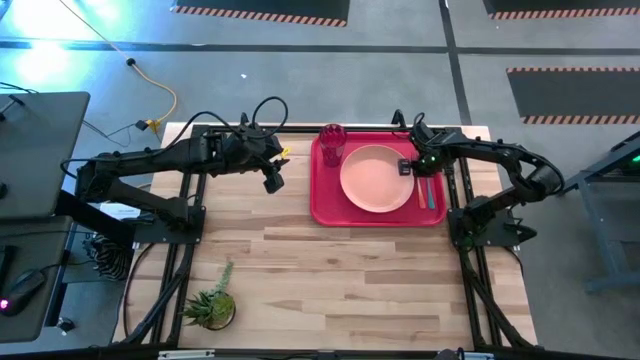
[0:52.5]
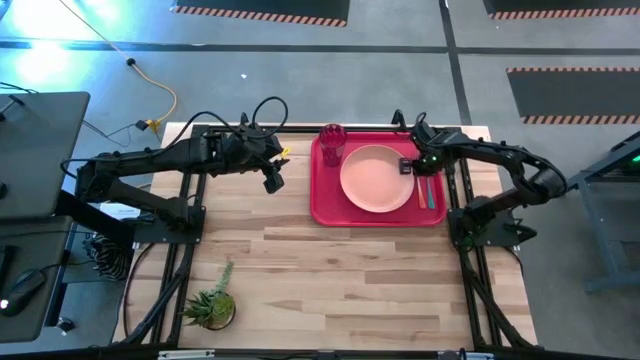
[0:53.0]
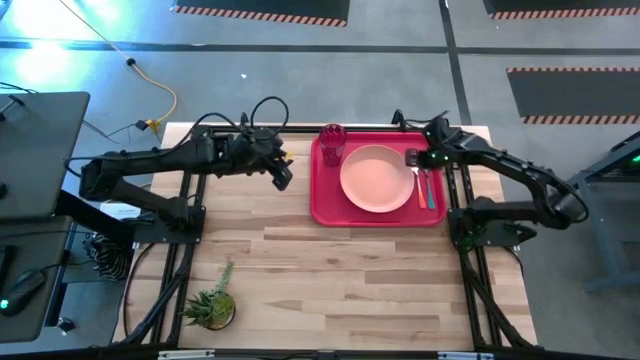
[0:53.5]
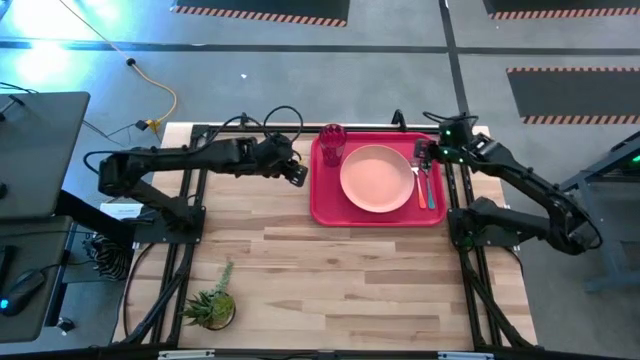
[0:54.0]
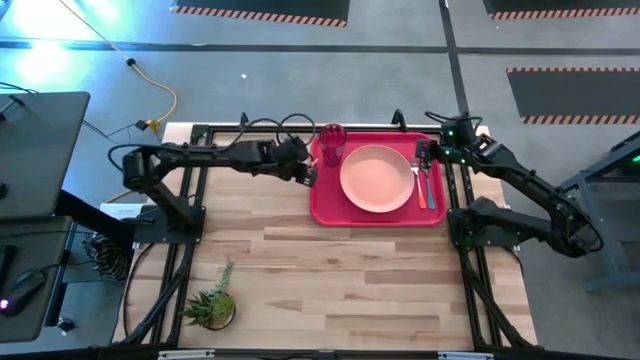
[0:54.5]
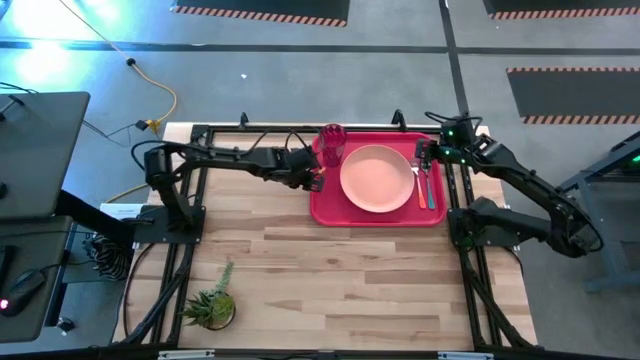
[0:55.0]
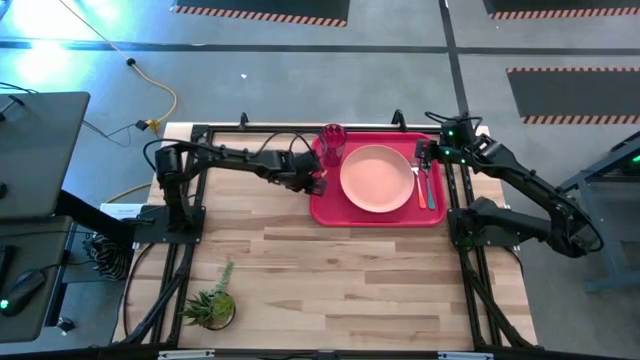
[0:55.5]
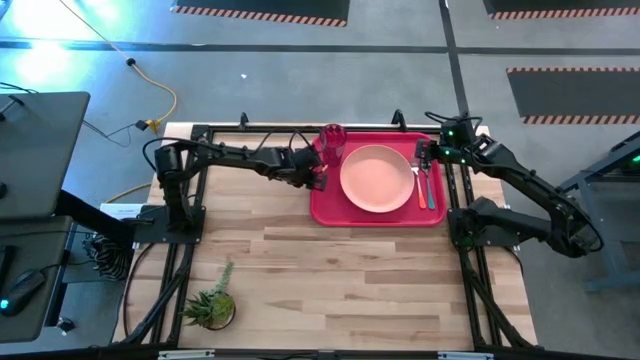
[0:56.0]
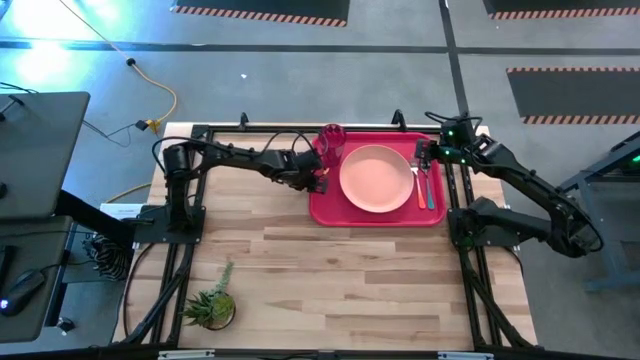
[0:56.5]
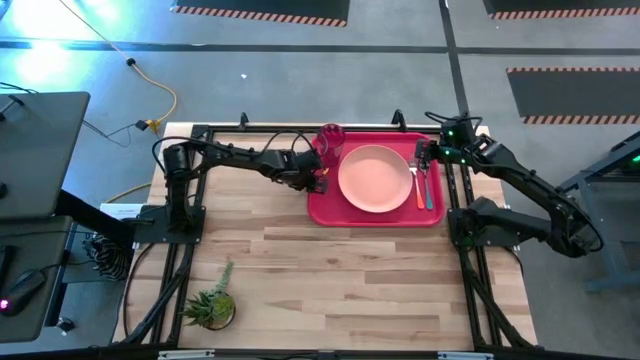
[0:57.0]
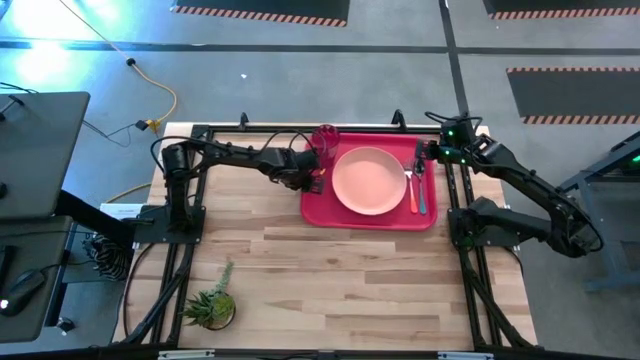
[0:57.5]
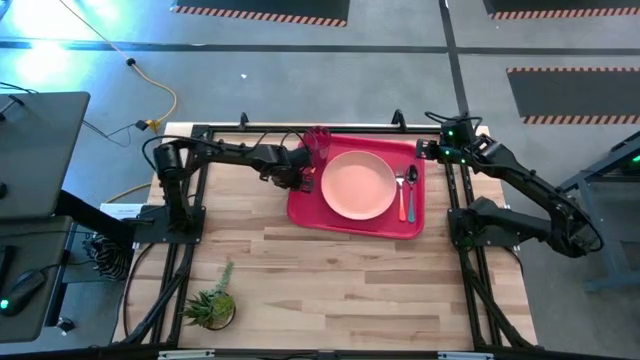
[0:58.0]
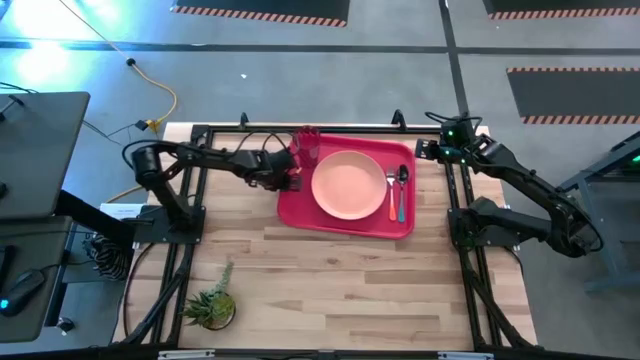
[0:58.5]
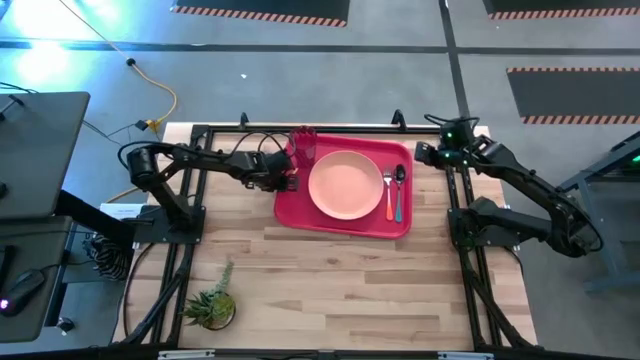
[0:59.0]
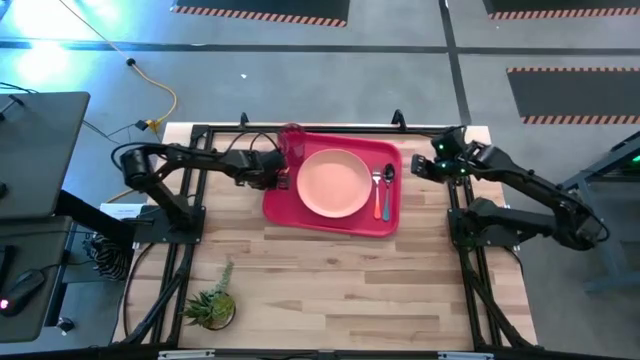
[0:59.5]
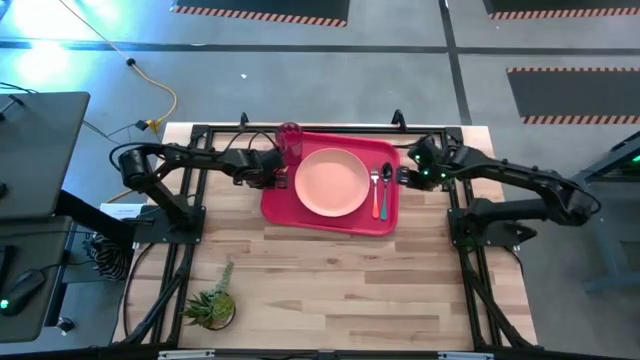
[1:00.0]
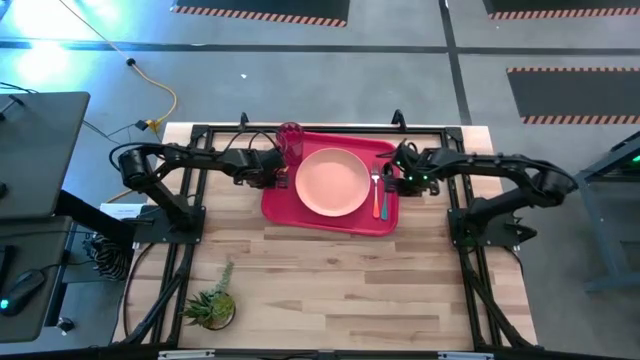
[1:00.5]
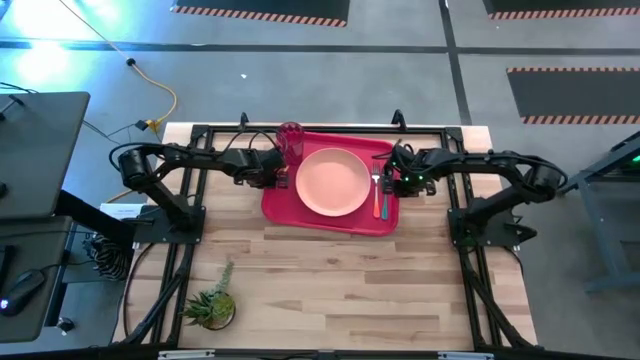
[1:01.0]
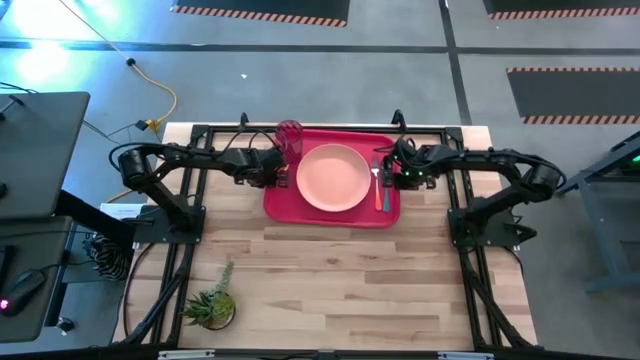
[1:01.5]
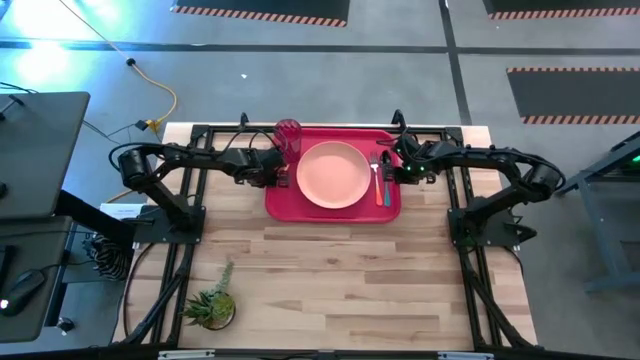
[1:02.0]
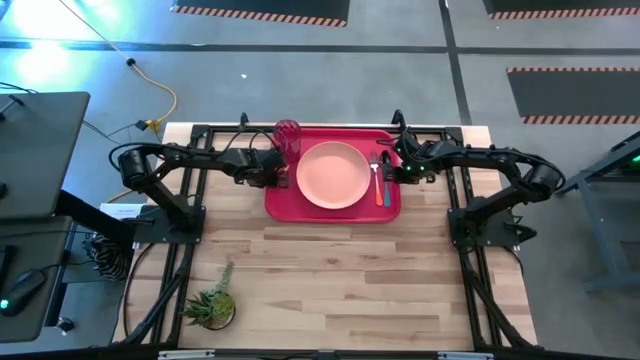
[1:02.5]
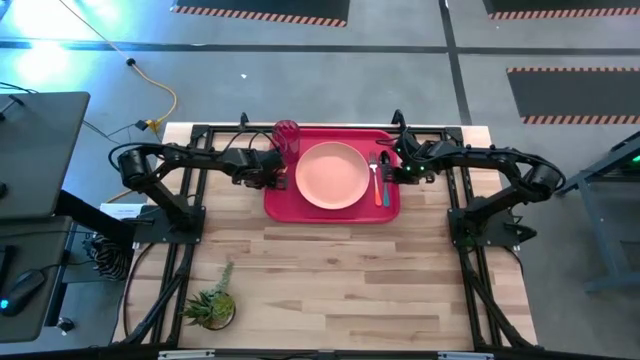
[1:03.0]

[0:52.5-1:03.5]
Task: Pick and place plate/cup/fork/spoon on tray
Adjust the red tray to the. top center

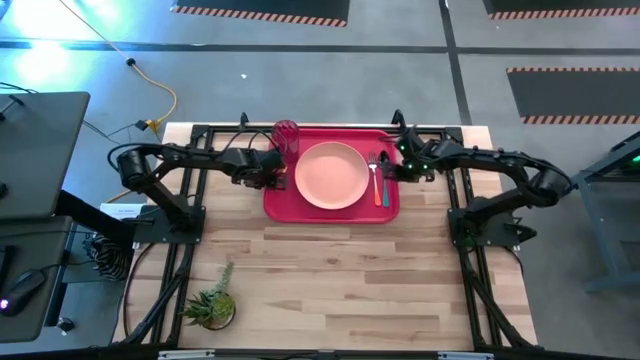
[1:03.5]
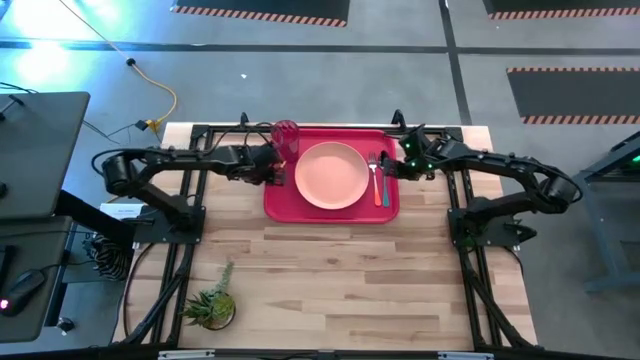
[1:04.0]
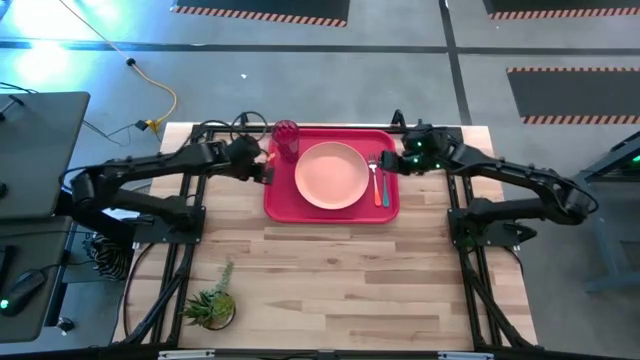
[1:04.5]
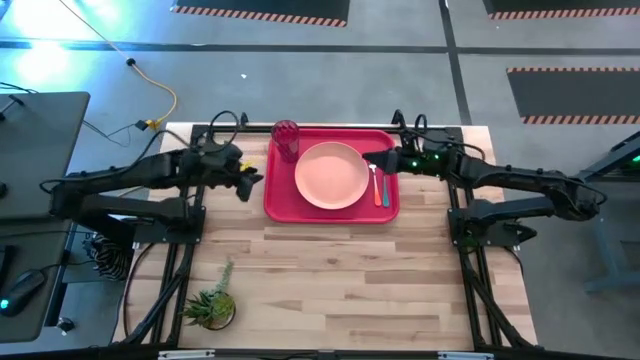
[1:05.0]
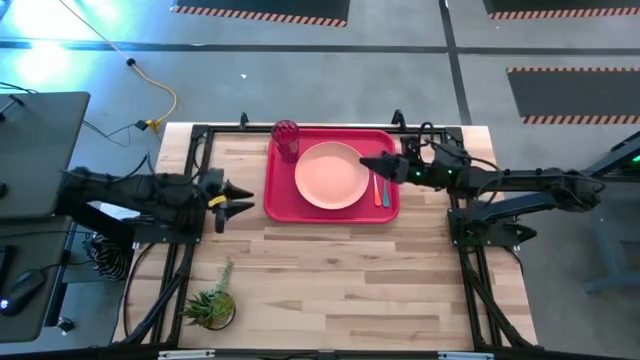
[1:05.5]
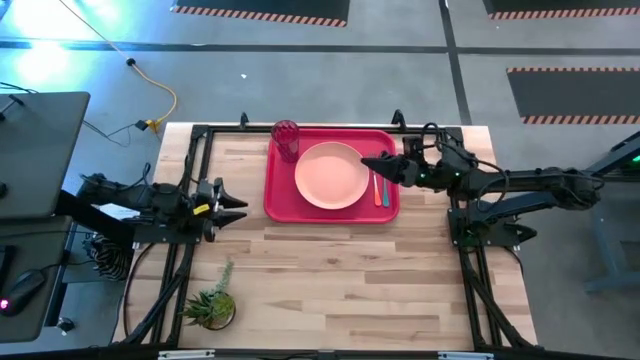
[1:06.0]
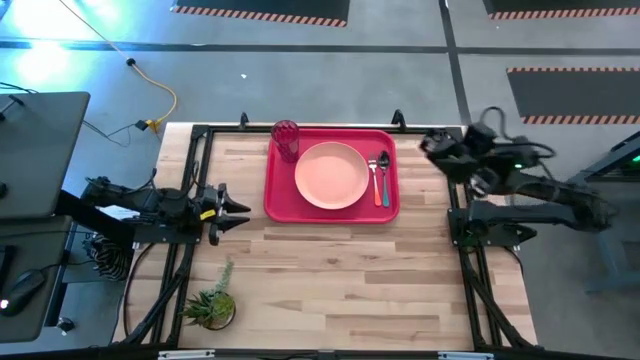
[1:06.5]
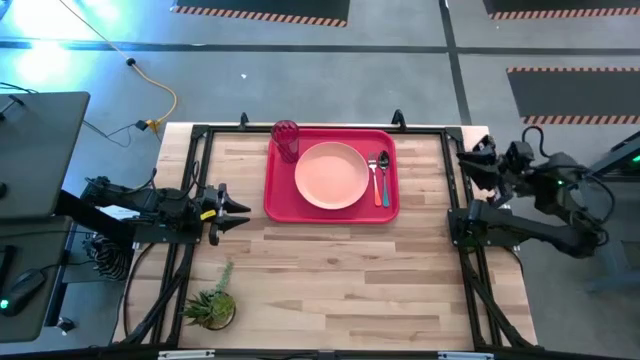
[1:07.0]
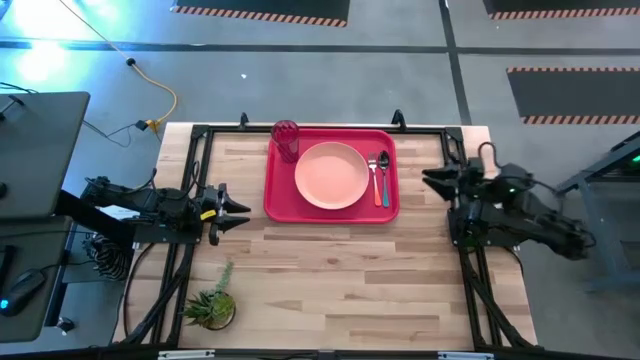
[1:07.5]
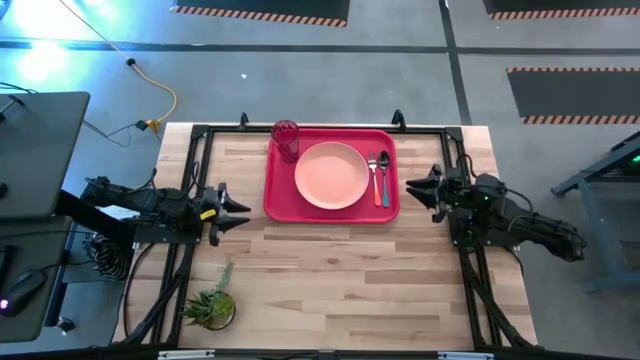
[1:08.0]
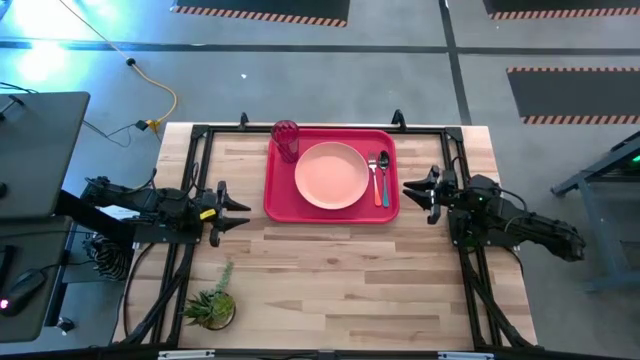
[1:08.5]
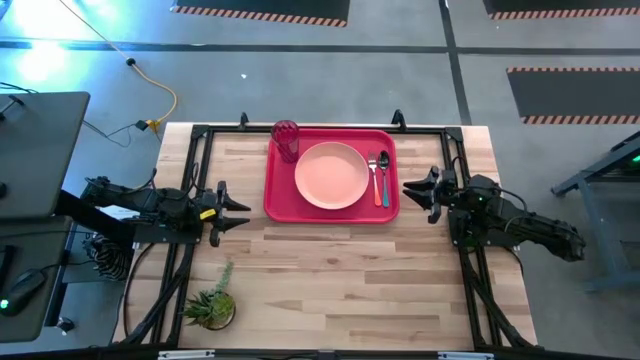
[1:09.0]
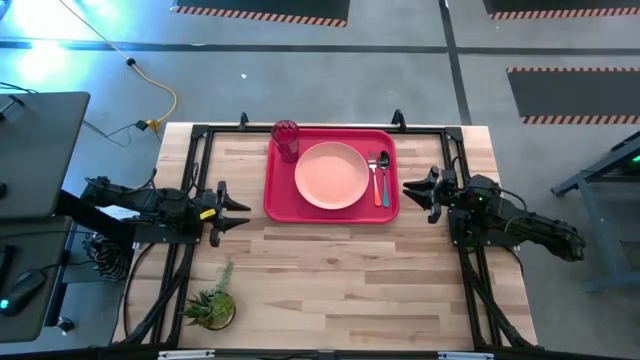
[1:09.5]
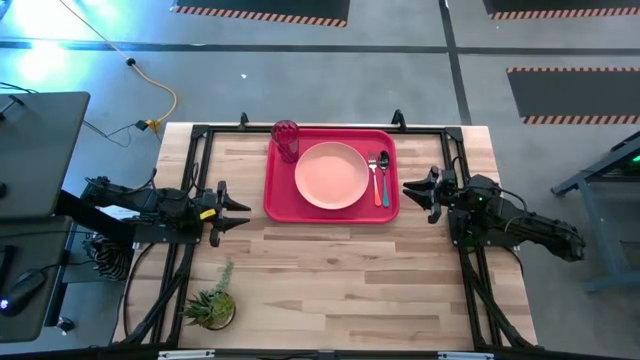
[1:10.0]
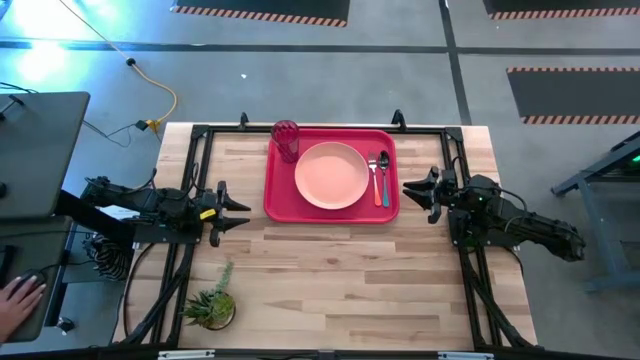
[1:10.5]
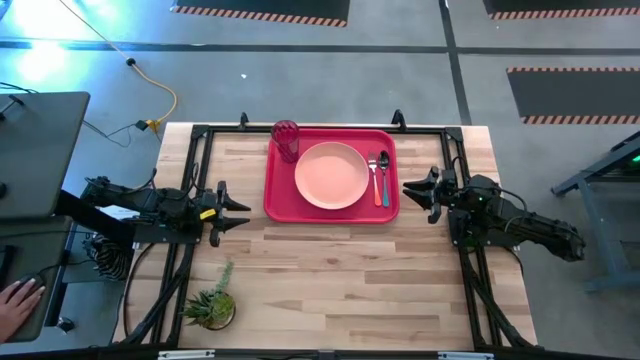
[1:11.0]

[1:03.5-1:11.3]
Return to Home Position

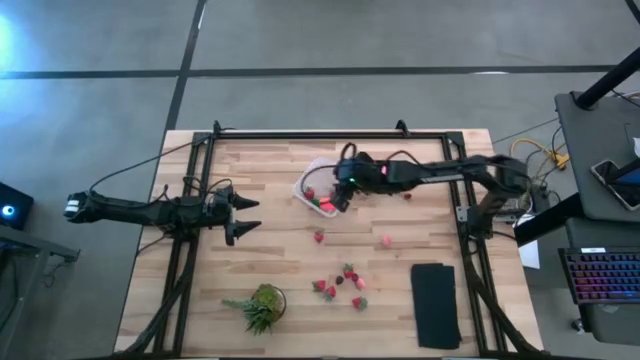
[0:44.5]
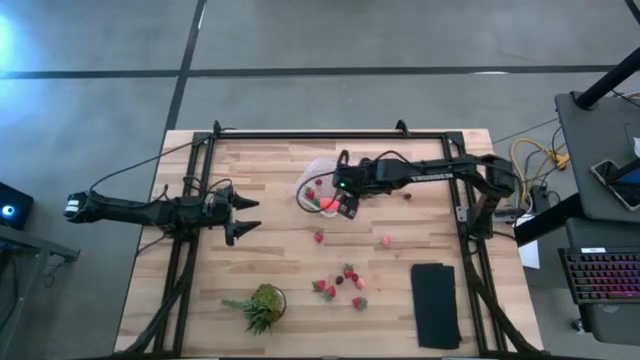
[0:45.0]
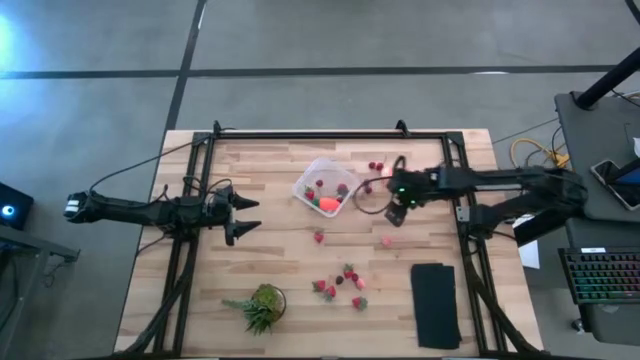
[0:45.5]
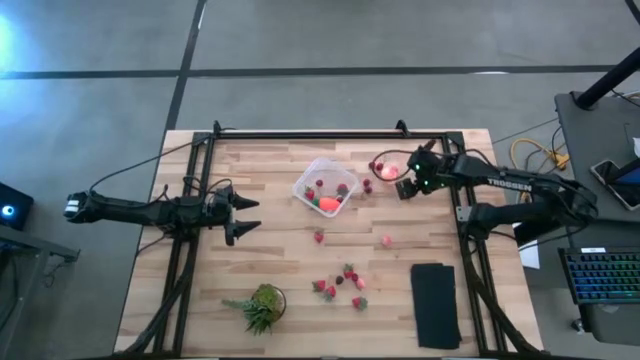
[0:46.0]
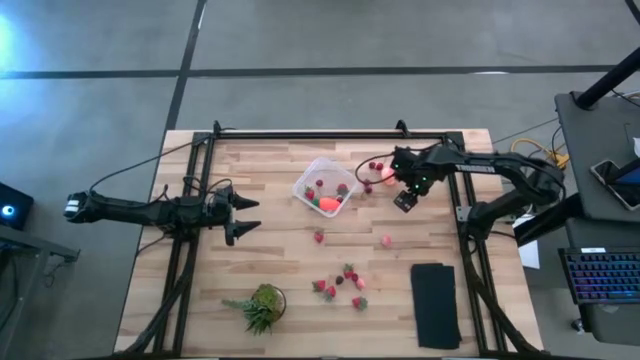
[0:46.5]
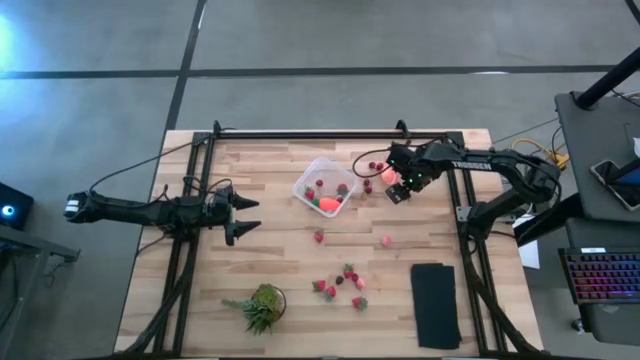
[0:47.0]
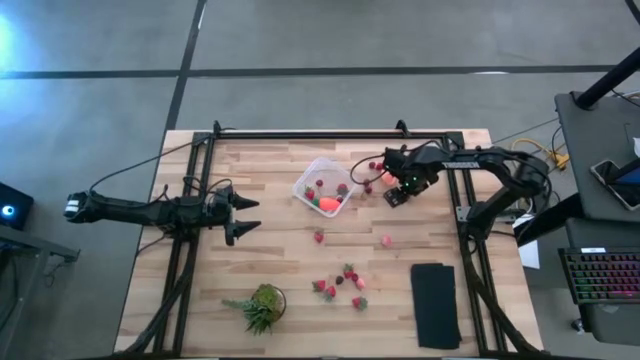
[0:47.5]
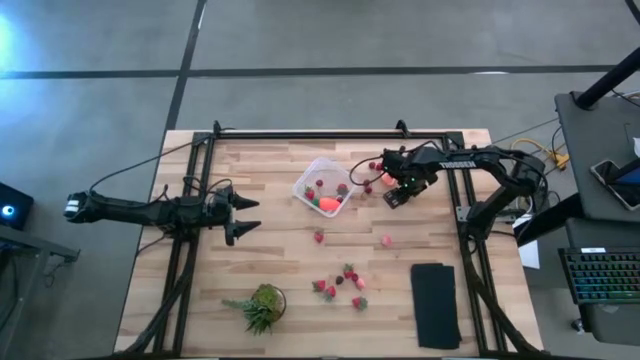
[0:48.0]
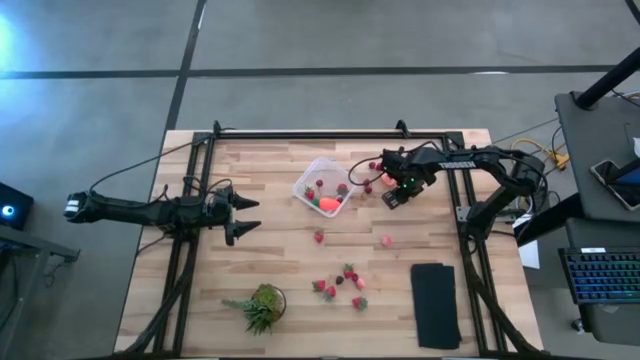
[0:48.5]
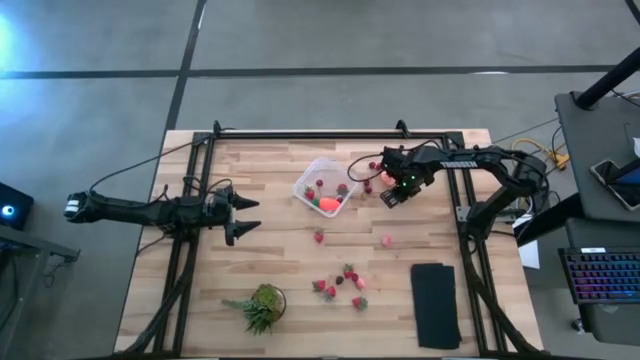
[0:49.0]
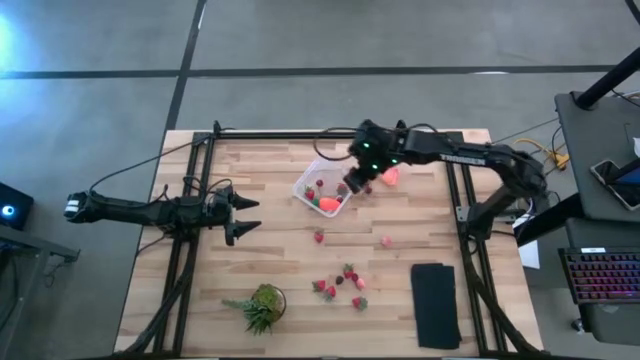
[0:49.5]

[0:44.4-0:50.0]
Task: Pick and placing Produce into tupperware
Put the red cherry into the transparent bin
